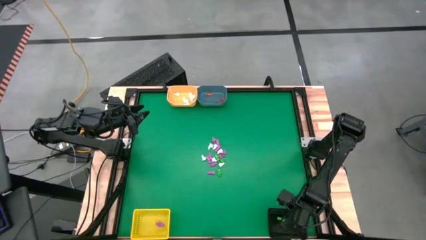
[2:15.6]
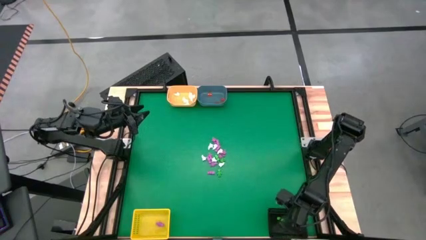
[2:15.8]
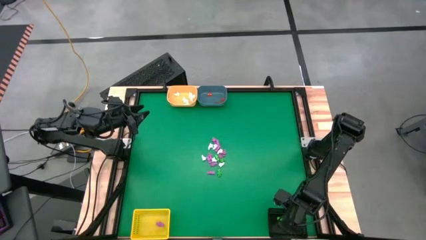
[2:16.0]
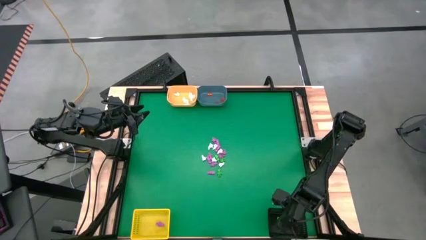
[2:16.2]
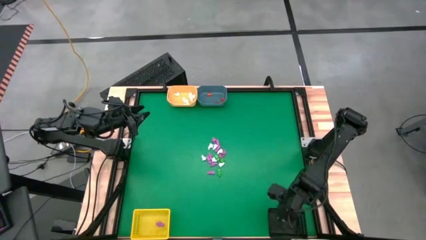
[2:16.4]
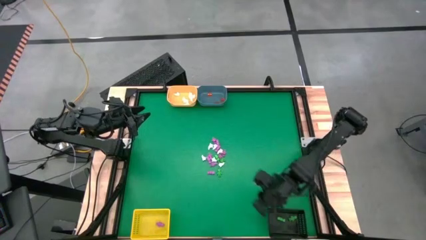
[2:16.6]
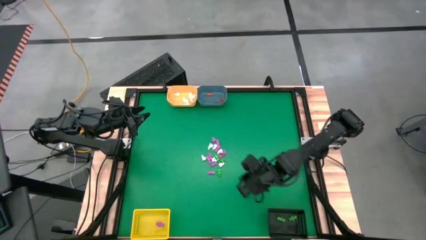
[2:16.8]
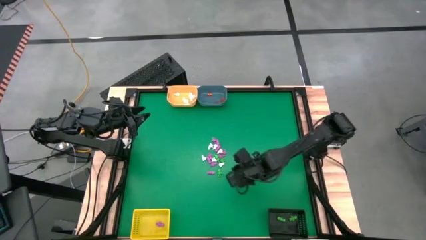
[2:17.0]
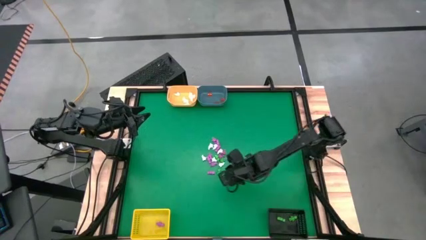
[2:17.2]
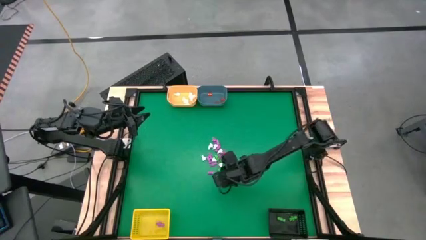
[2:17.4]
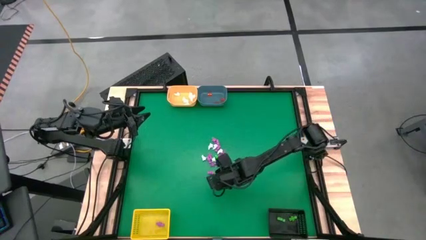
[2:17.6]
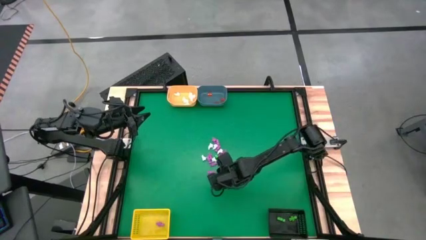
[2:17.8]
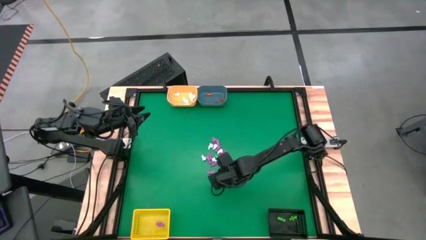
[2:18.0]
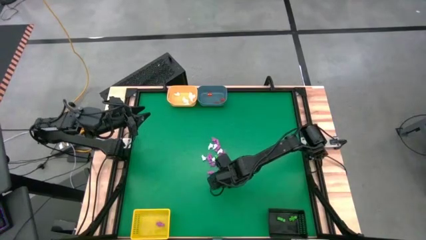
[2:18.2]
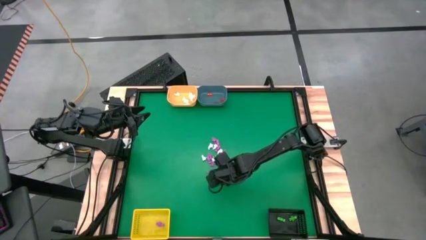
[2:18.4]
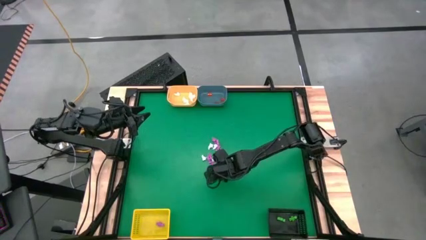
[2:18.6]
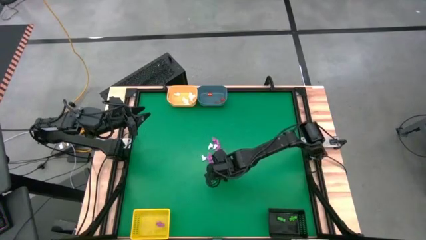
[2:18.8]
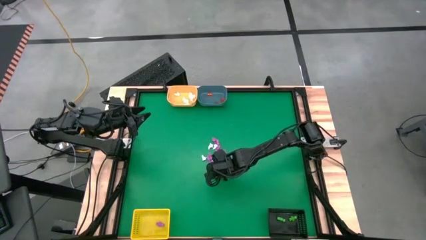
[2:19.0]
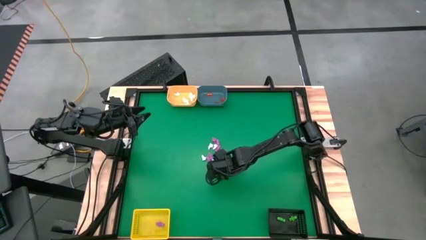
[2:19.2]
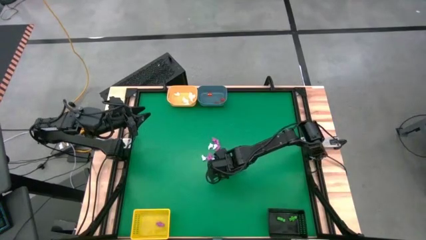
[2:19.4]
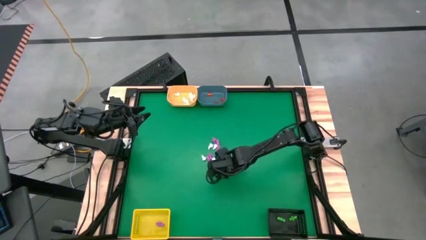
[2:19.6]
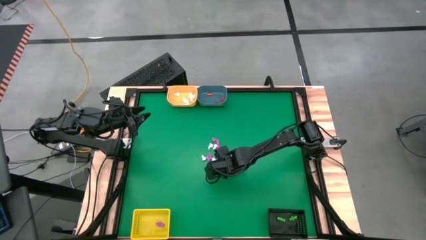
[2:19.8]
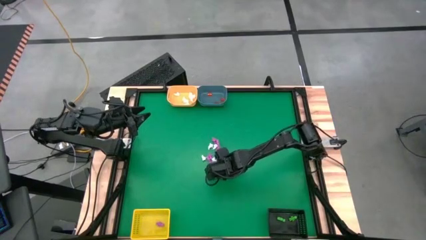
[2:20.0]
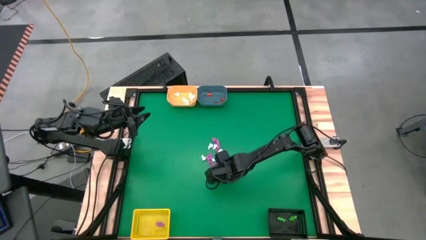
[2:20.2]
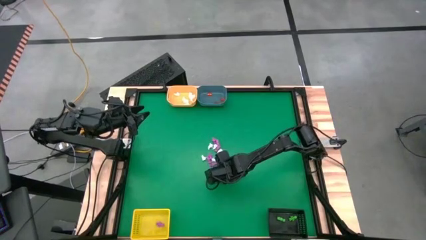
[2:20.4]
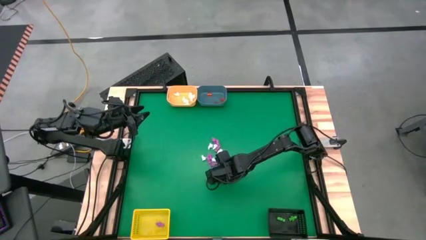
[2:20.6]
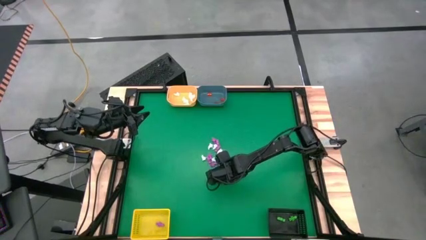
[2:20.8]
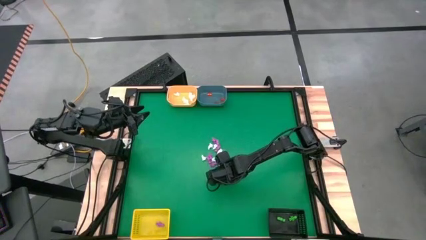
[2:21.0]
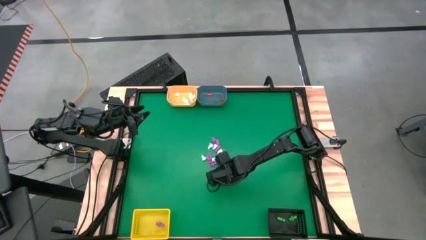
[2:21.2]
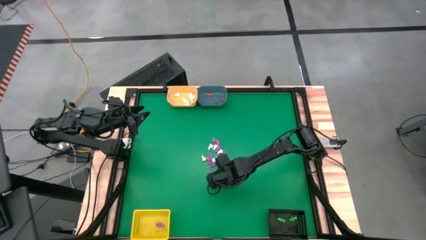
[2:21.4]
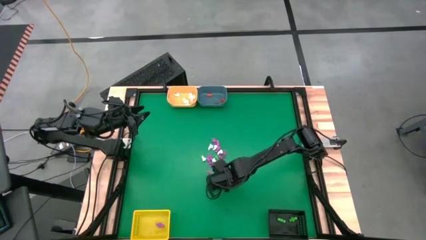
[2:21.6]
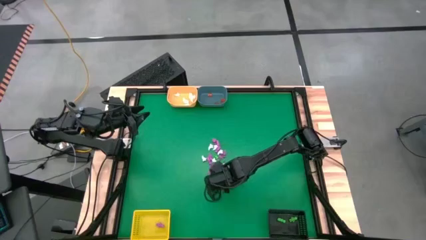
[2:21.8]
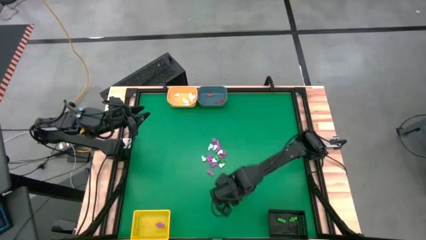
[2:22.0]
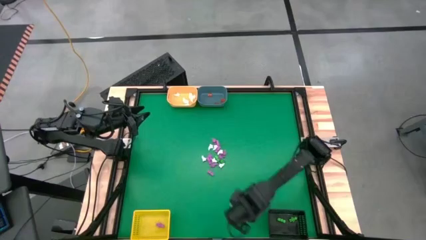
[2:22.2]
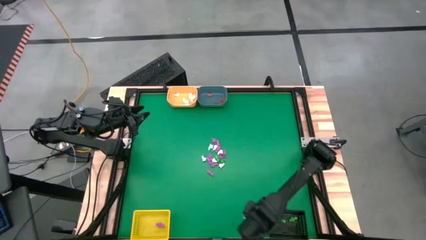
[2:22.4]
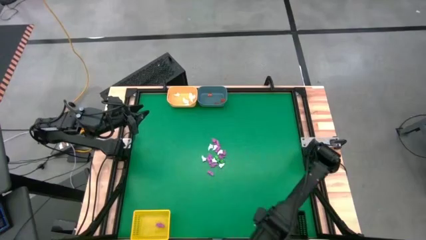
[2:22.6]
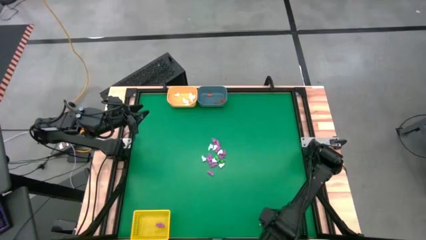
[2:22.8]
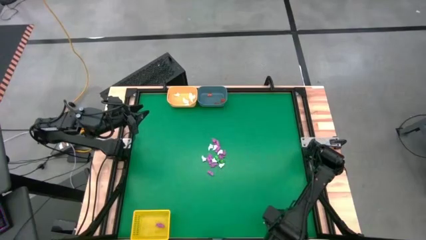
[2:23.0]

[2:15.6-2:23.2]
Task: Sort Halloween decoration
Put the green skeleton into the black bin

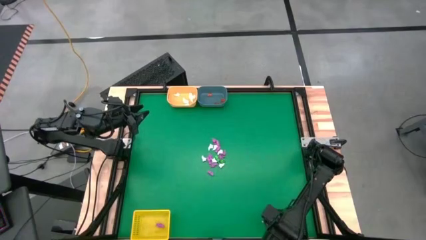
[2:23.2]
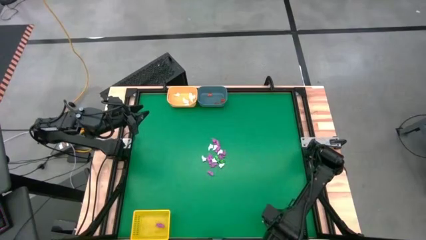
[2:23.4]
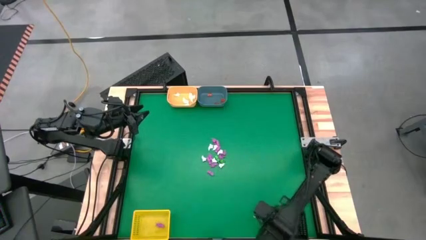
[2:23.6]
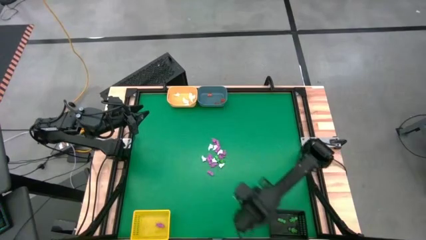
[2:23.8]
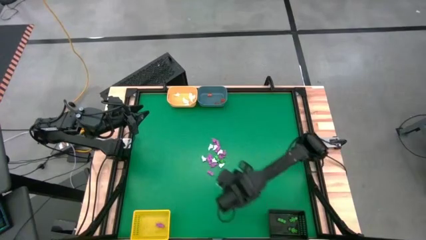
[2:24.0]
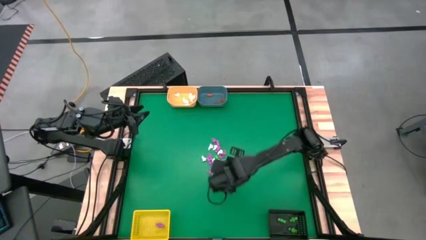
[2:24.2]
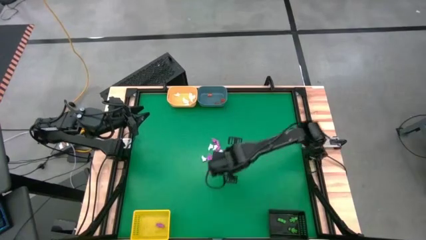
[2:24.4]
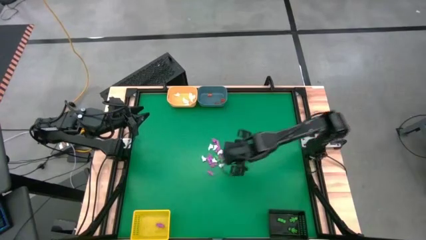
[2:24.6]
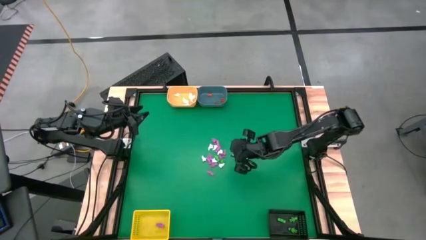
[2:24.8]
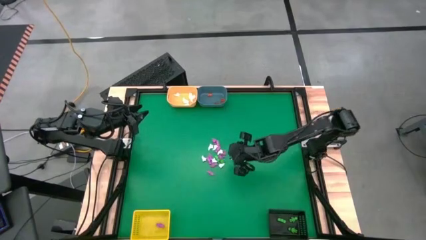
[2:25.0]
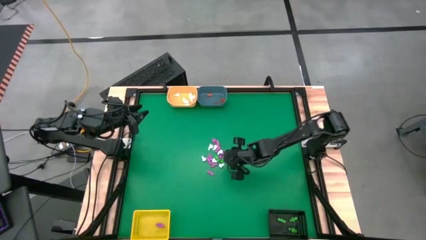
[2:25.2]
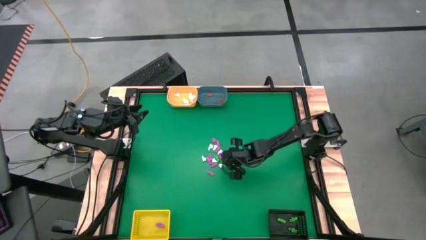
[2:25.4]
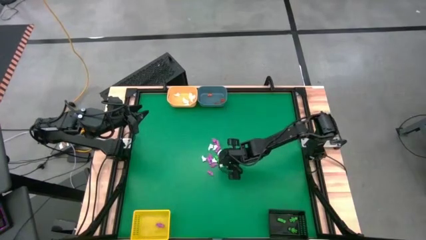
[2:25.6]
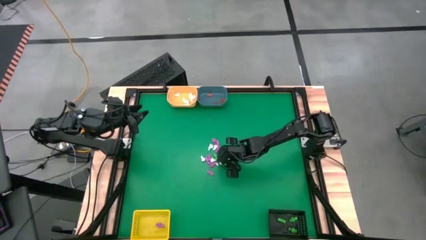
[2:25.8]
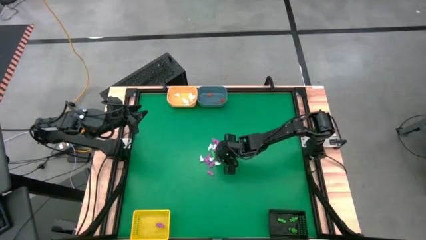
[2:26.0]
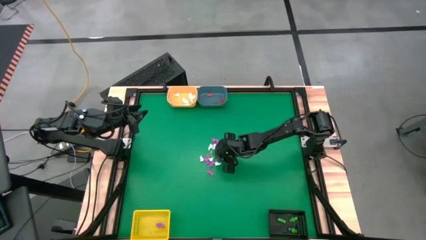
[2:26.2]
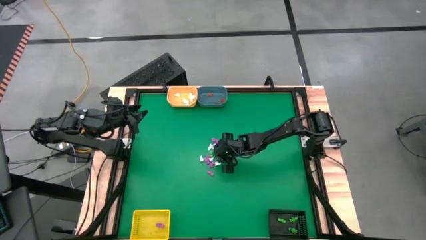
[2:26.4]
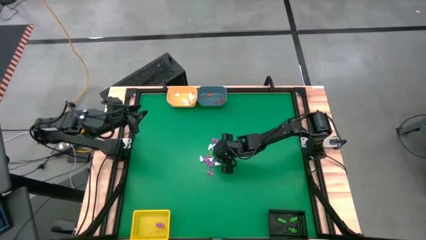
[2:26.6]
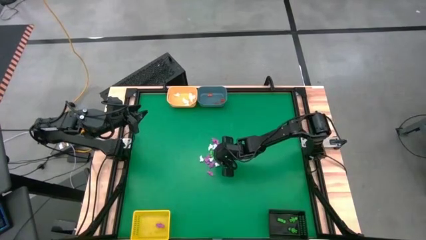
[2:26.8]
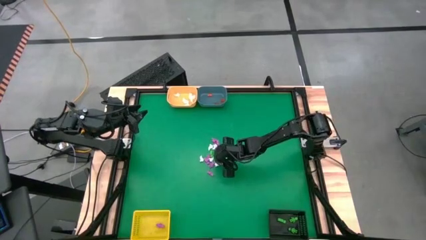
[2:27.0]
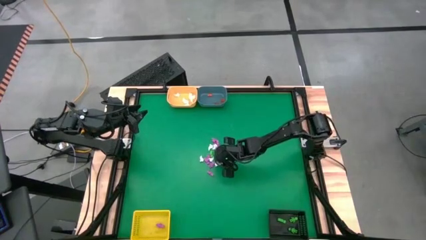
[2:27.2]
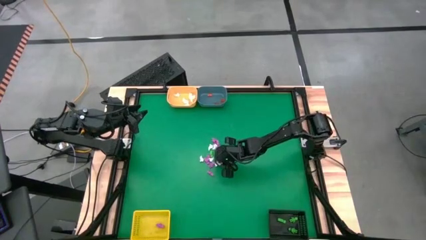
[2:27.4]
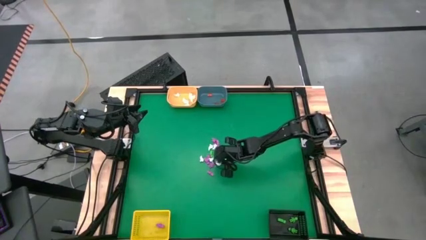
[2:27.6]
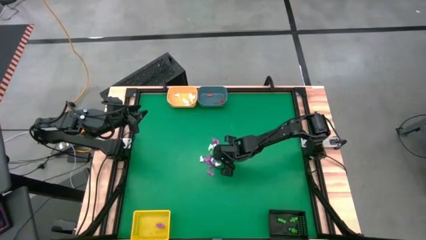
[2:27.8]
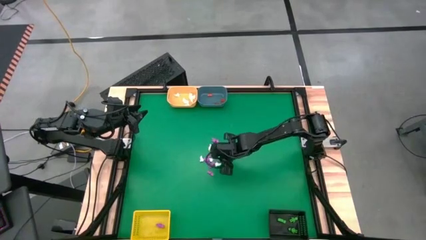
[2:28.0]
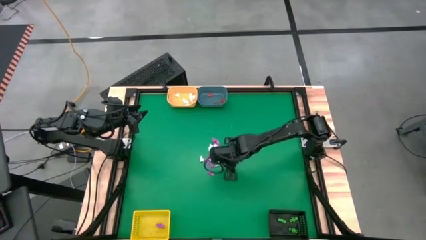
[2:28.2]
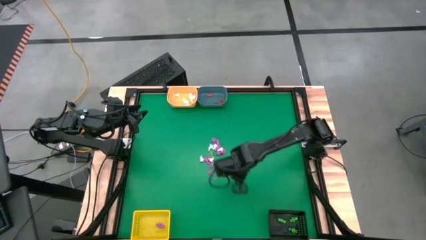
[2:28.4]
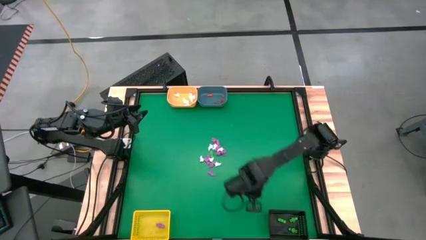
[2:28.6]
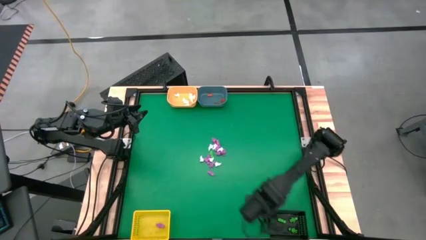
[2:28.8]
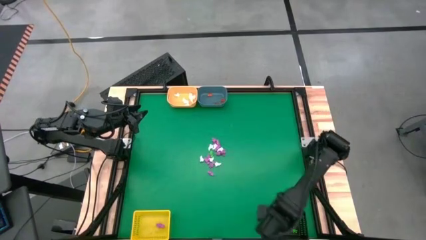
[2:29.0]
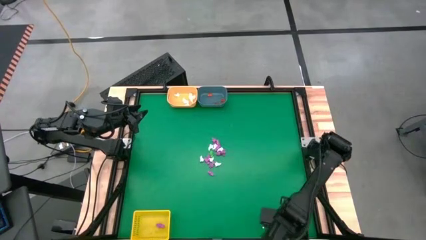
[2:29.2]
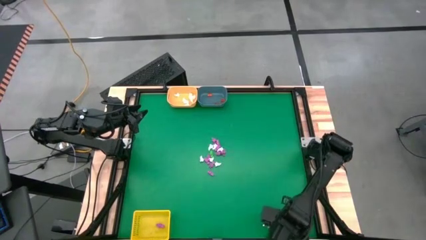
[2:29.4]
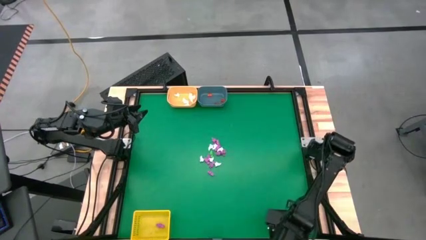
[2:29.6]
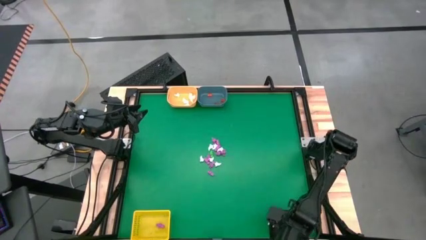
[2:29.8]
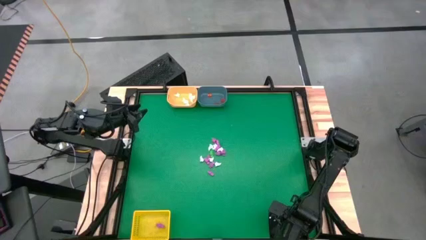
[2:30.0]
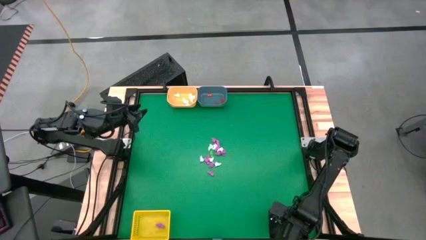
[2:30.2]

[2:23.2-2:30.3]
Put the green skeleton into the black bin
